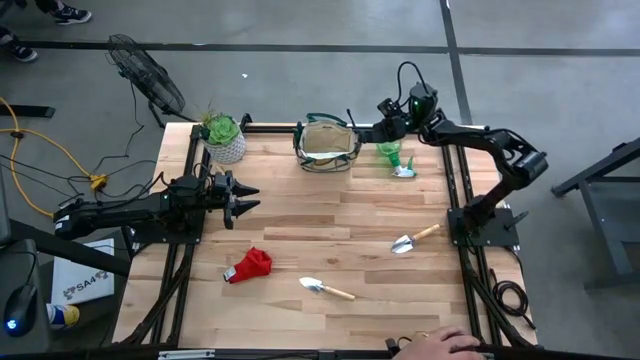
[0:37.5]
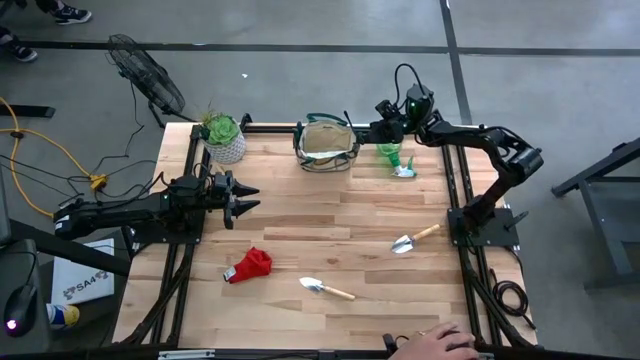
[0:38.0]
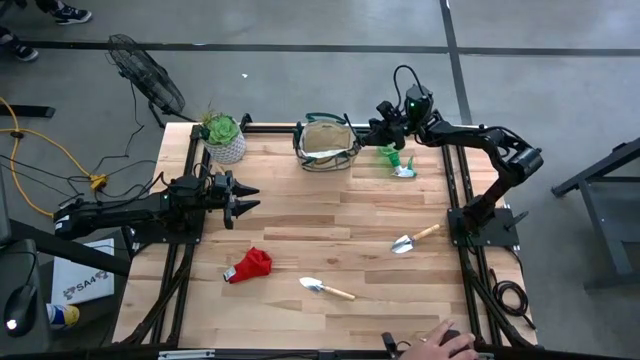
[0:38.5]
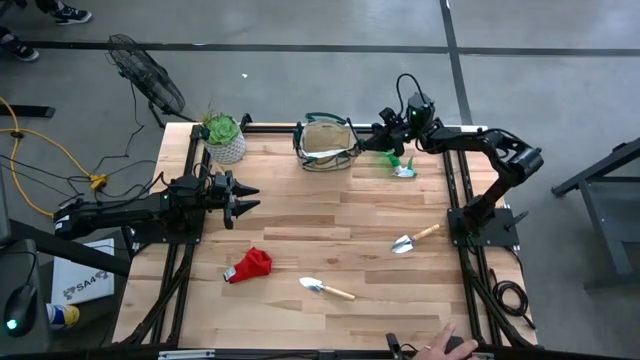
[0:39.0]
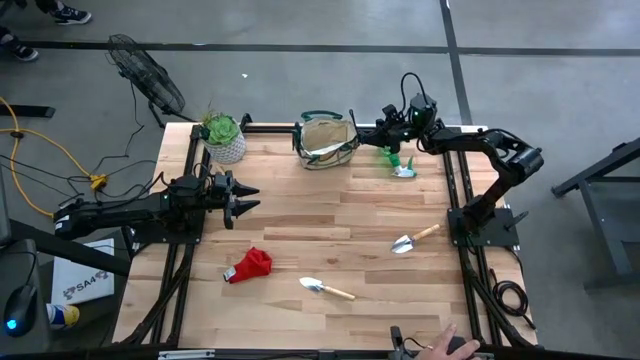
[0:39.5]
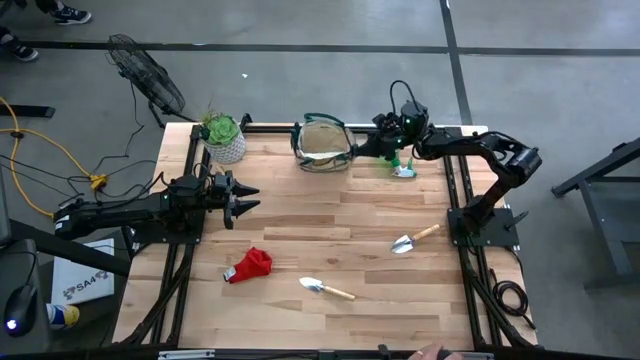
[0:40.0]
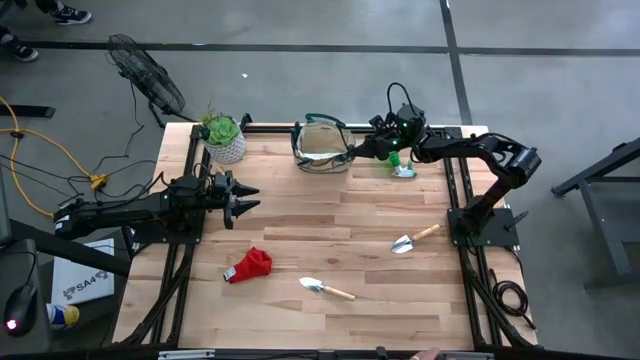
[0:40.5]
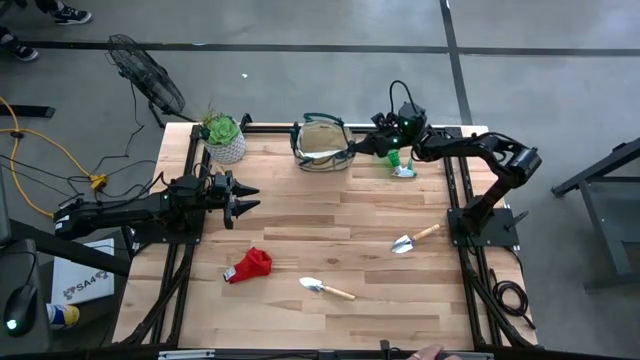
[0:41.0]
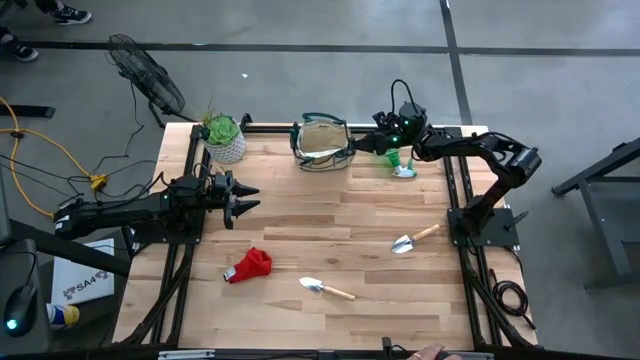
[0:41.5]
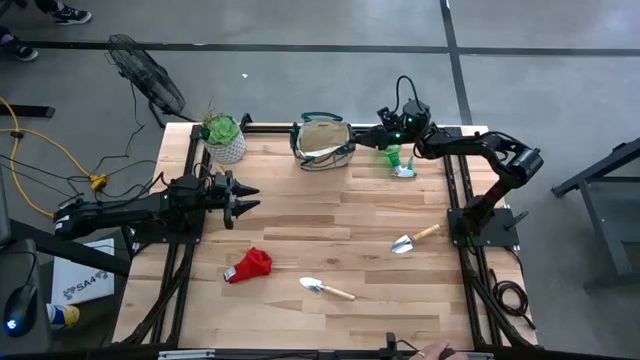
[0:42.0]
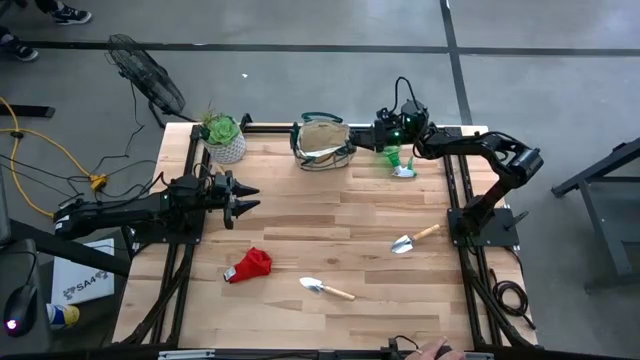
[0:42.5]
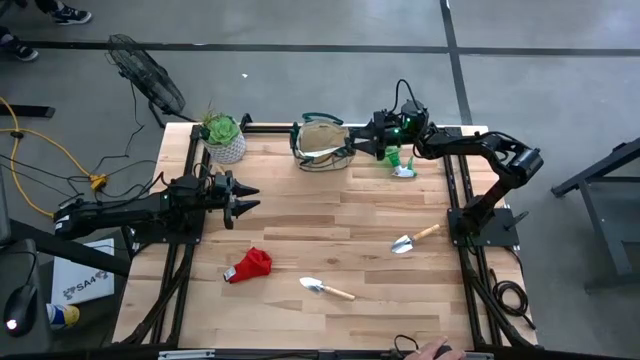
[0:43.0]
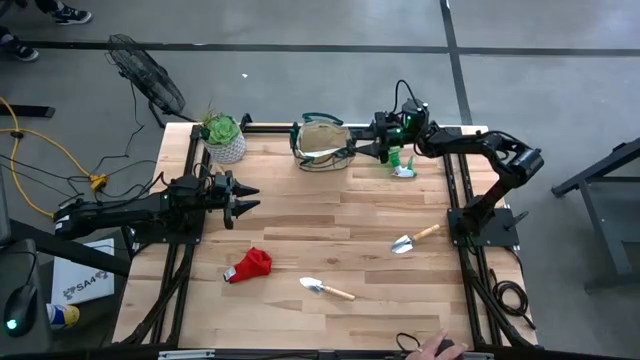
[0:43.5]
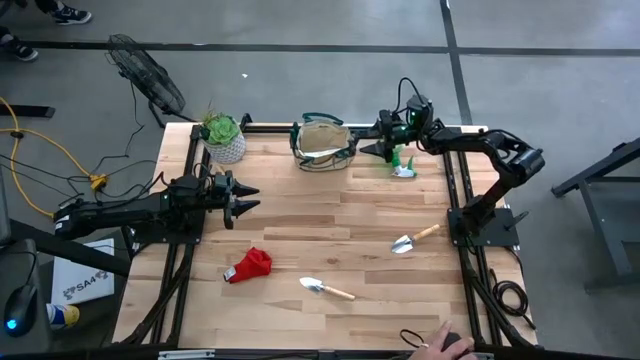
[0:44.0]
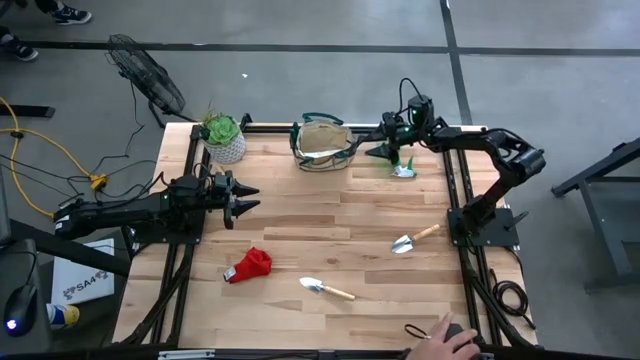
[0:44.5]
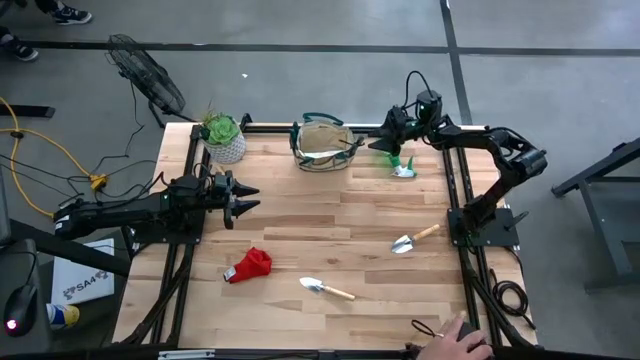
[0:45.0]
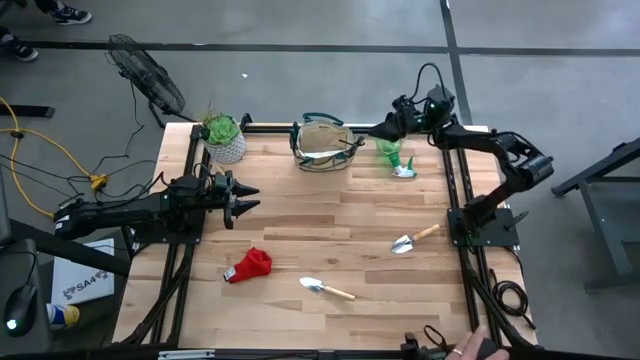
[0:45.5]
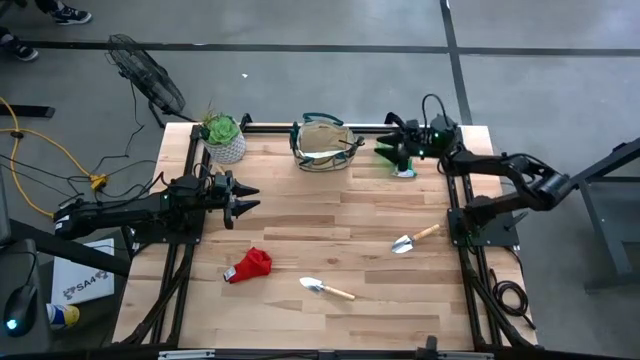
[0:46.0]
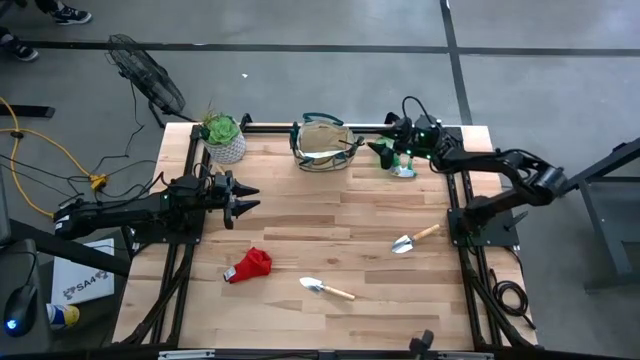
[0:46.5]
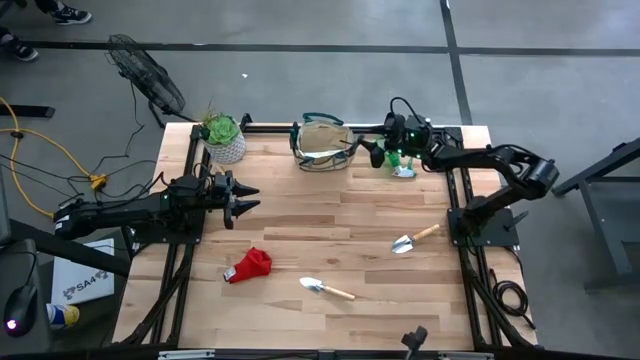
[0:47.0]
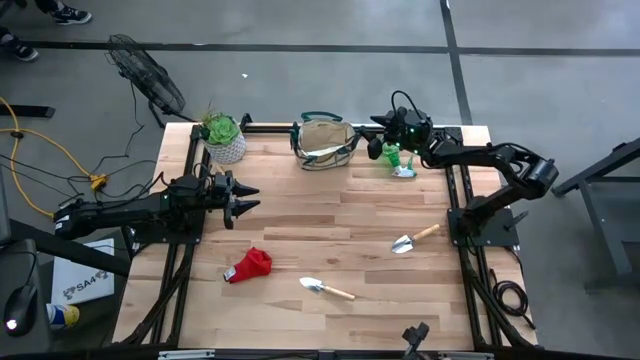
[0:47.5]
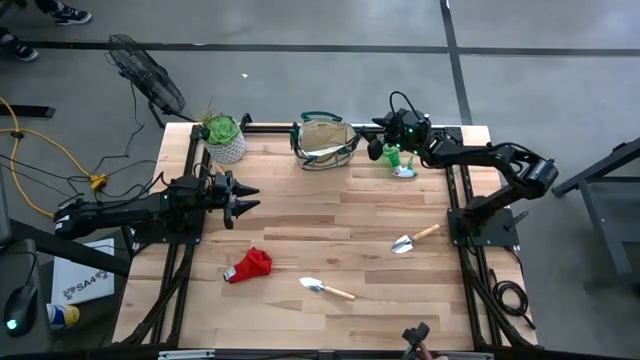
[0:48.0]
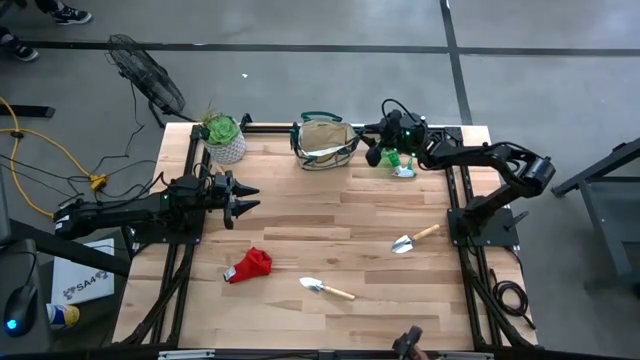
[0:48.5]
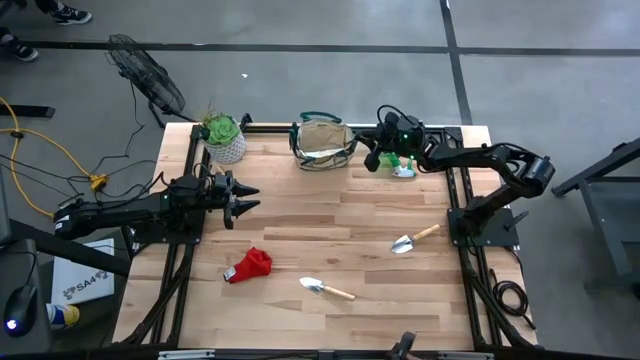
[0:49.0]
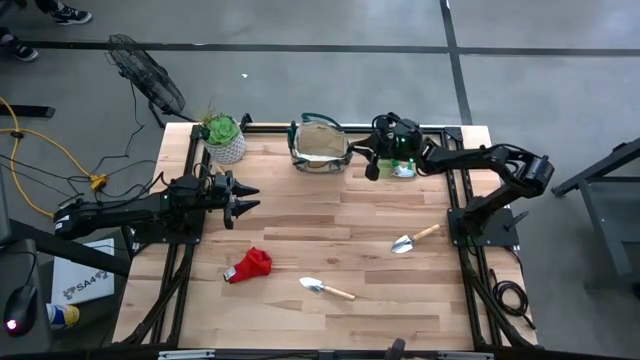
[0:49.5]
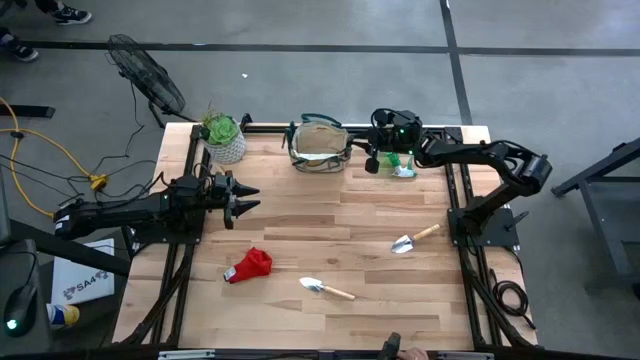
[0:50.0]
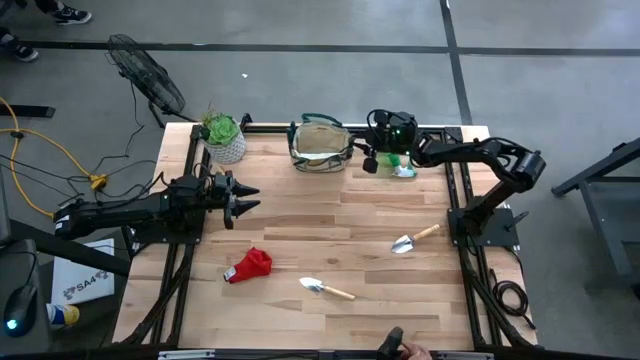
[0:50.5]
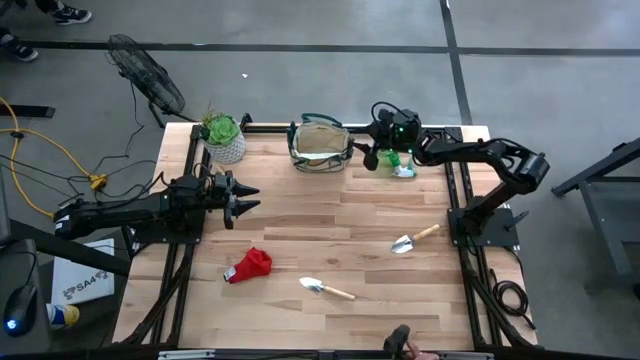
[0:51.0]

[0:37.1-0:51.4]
Task: Pick & Place Garden tools in Gardening bag
Put the shear scissors into the gardening bag
